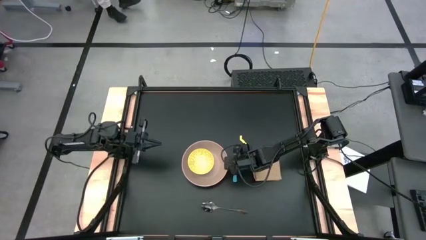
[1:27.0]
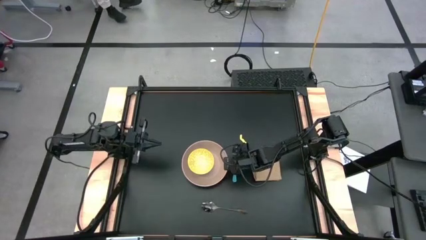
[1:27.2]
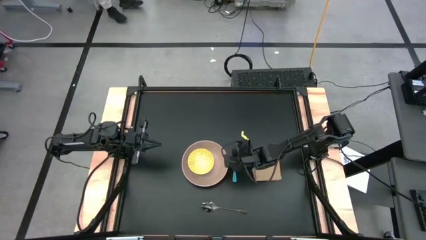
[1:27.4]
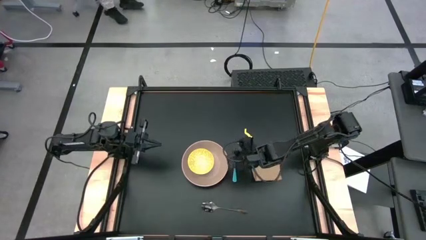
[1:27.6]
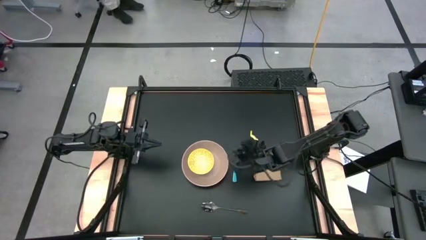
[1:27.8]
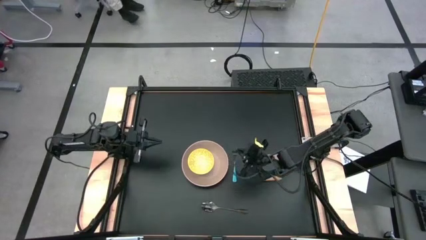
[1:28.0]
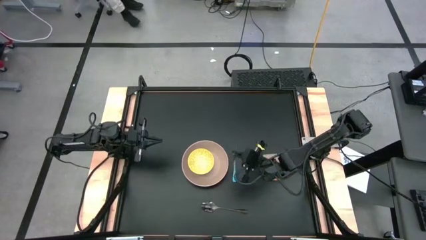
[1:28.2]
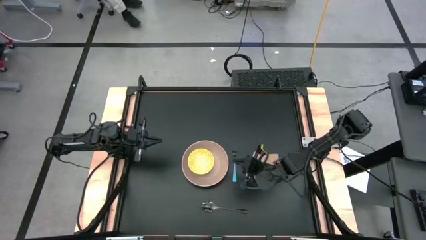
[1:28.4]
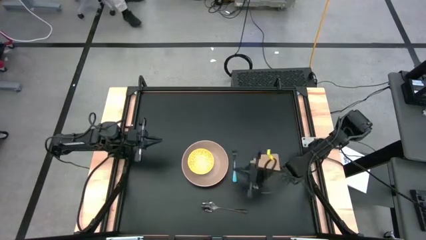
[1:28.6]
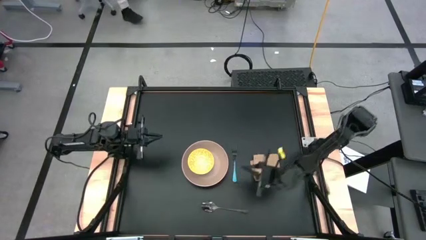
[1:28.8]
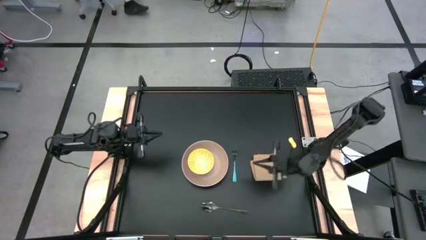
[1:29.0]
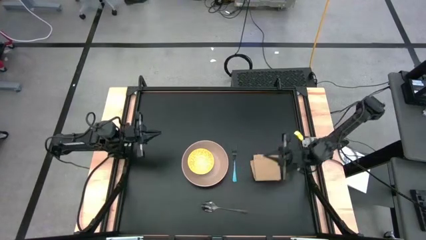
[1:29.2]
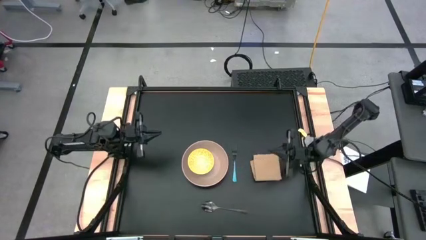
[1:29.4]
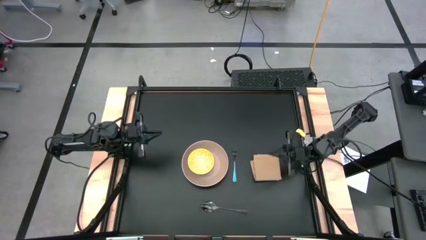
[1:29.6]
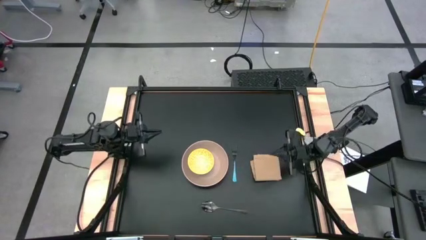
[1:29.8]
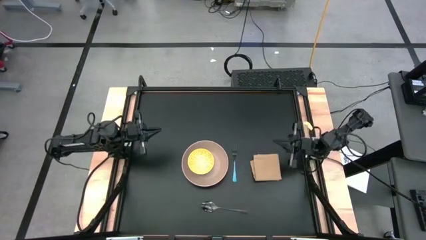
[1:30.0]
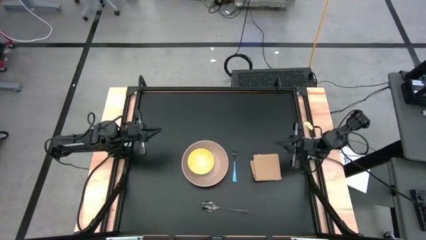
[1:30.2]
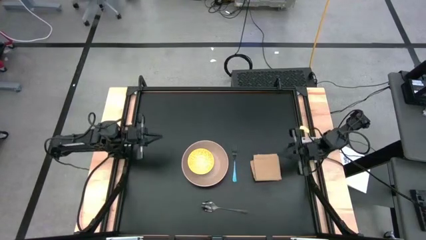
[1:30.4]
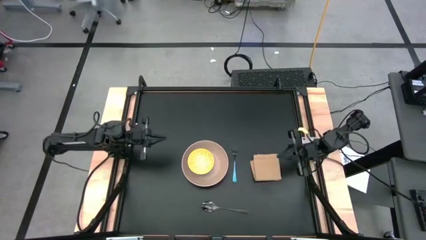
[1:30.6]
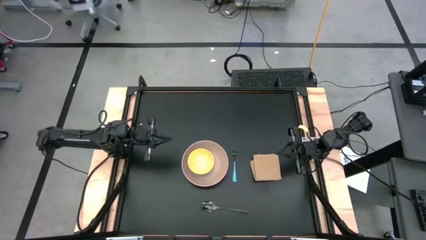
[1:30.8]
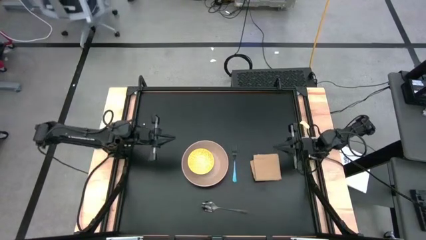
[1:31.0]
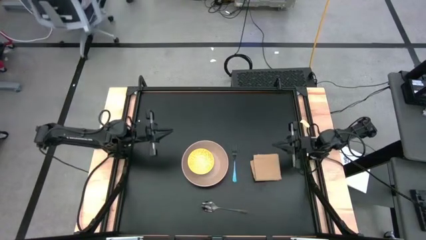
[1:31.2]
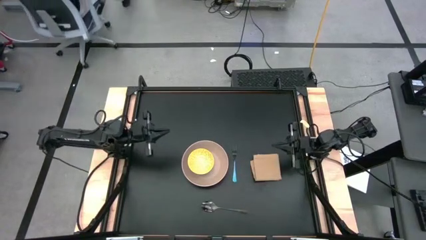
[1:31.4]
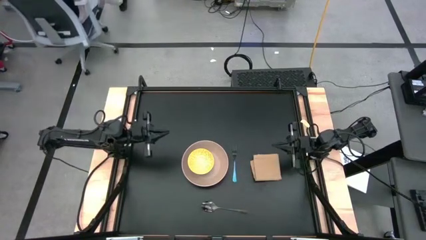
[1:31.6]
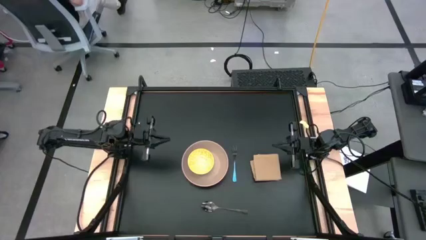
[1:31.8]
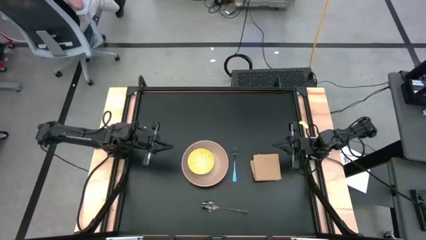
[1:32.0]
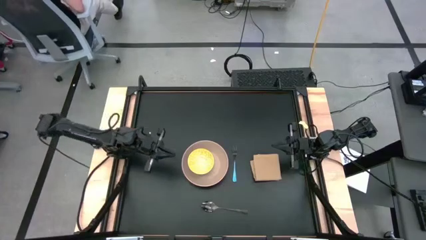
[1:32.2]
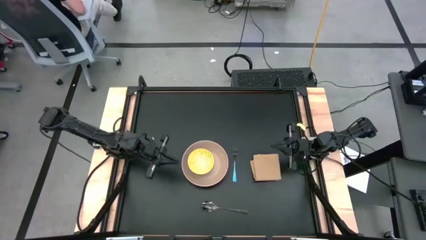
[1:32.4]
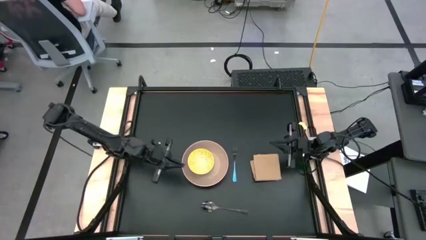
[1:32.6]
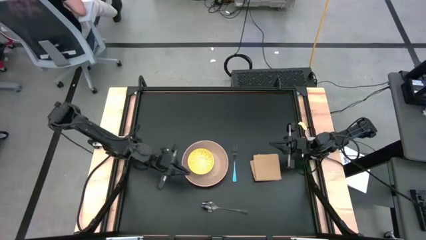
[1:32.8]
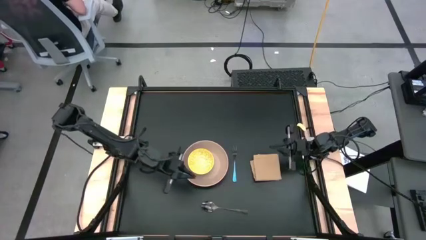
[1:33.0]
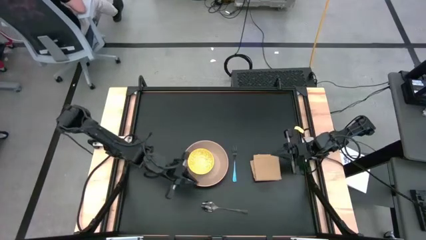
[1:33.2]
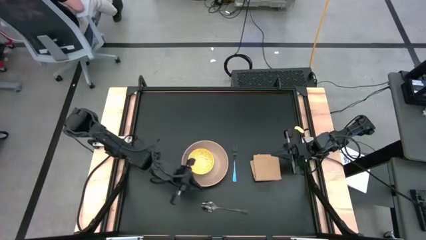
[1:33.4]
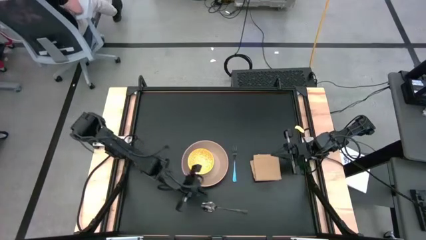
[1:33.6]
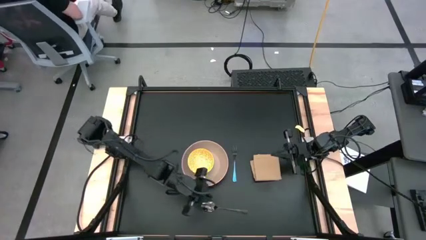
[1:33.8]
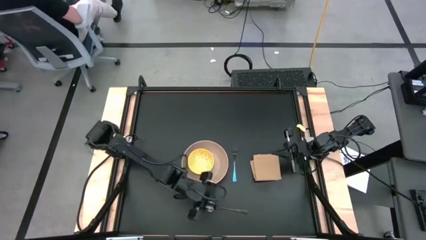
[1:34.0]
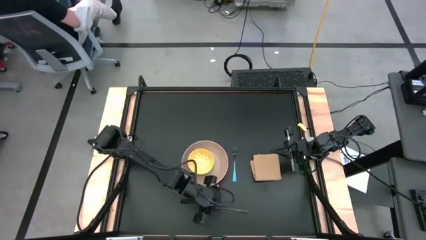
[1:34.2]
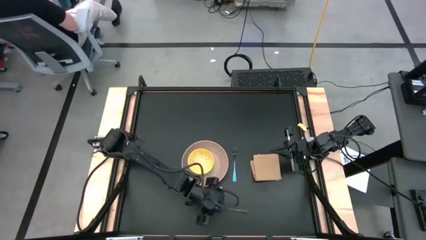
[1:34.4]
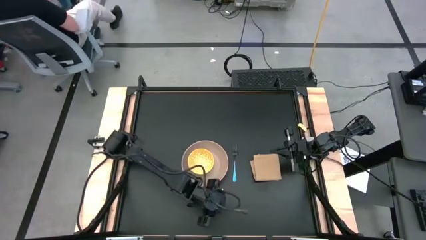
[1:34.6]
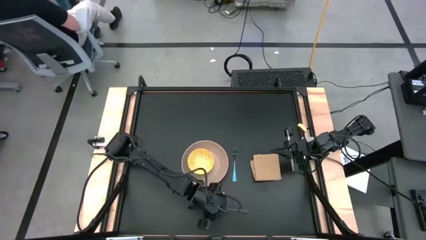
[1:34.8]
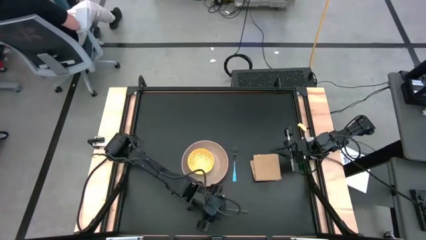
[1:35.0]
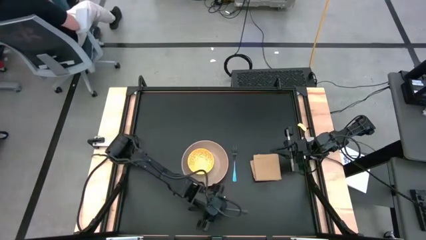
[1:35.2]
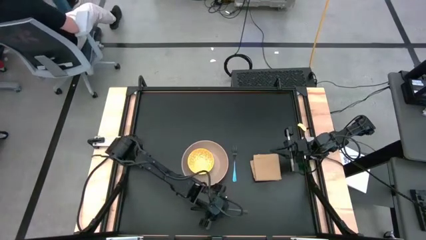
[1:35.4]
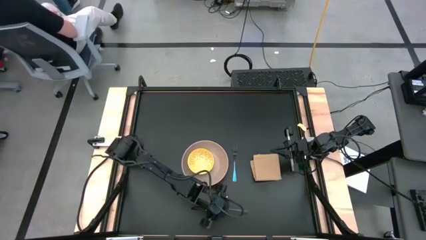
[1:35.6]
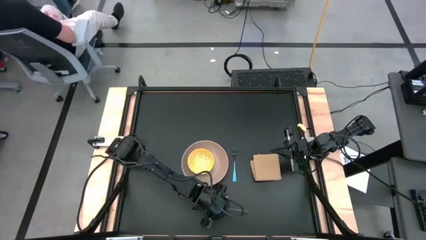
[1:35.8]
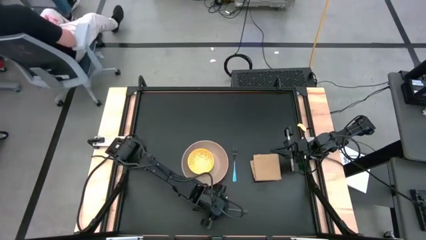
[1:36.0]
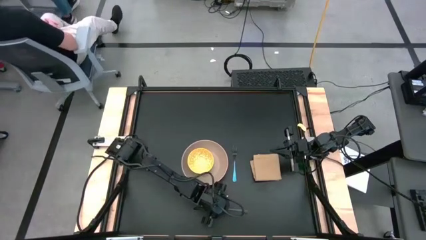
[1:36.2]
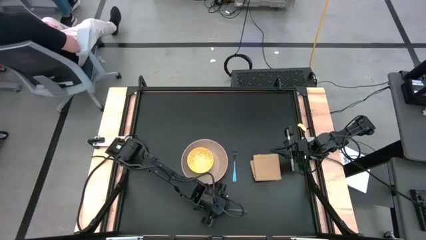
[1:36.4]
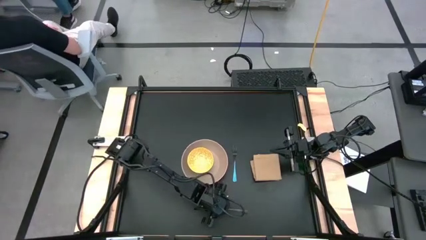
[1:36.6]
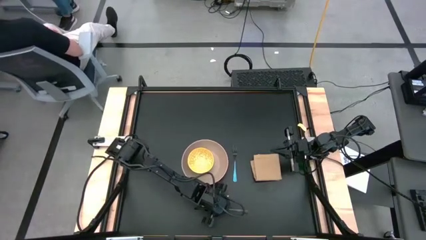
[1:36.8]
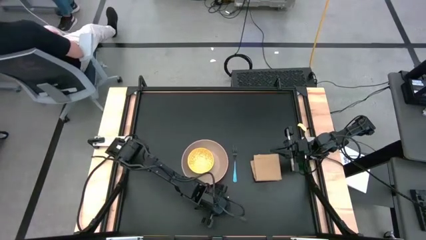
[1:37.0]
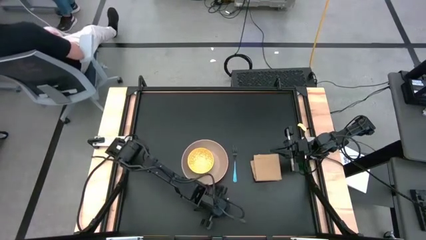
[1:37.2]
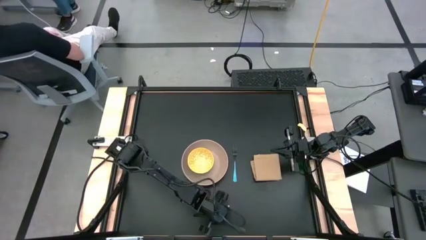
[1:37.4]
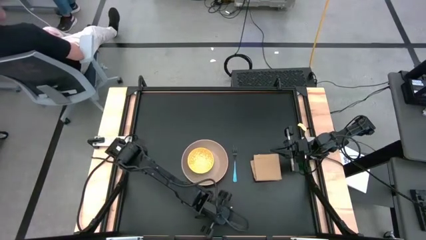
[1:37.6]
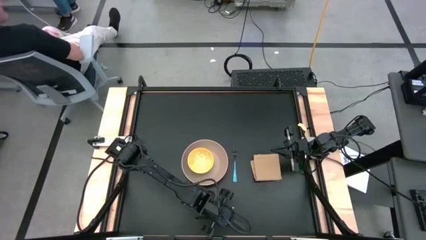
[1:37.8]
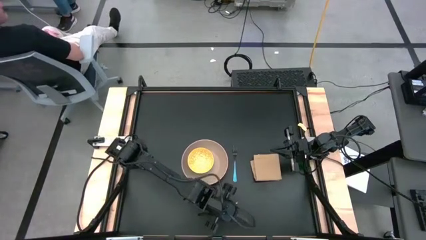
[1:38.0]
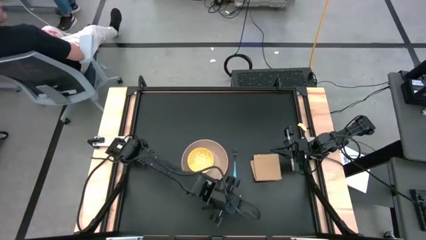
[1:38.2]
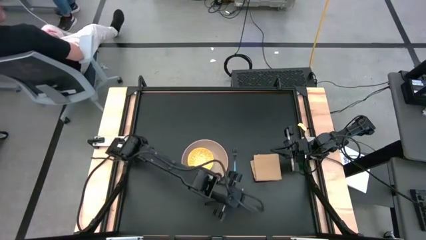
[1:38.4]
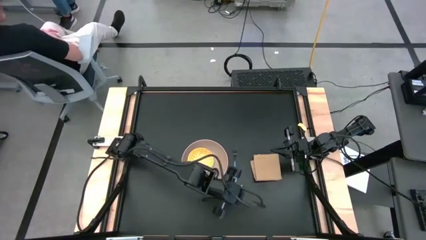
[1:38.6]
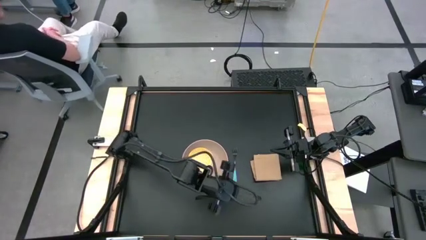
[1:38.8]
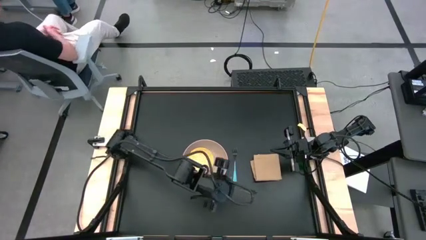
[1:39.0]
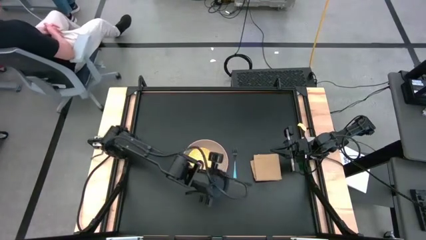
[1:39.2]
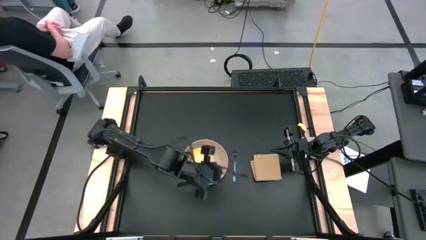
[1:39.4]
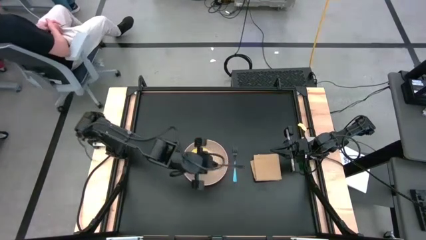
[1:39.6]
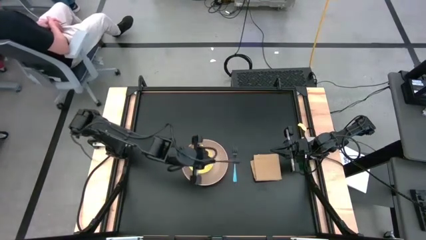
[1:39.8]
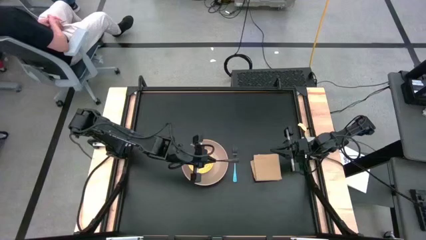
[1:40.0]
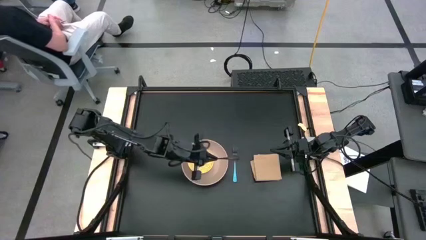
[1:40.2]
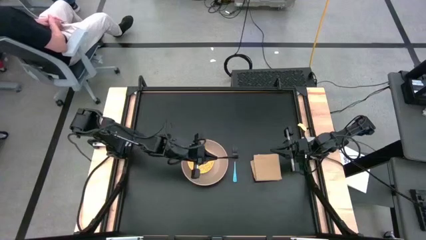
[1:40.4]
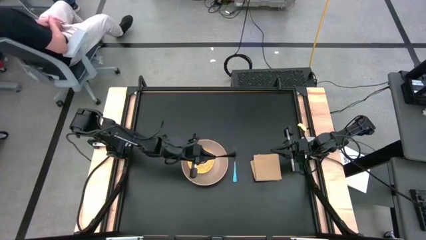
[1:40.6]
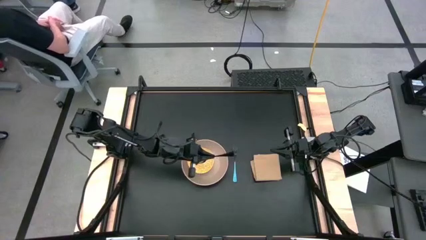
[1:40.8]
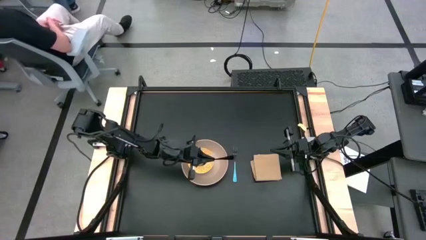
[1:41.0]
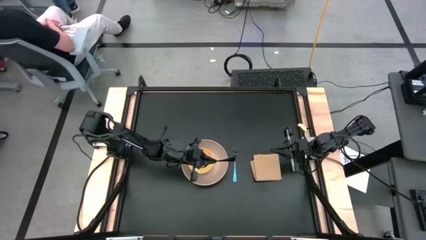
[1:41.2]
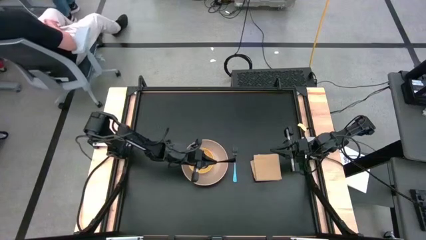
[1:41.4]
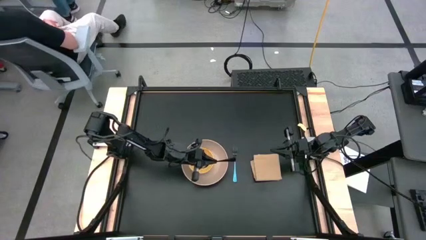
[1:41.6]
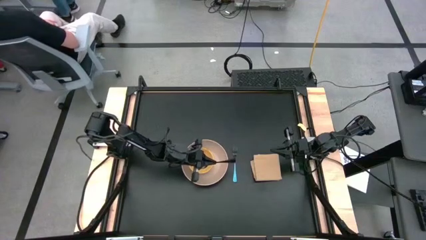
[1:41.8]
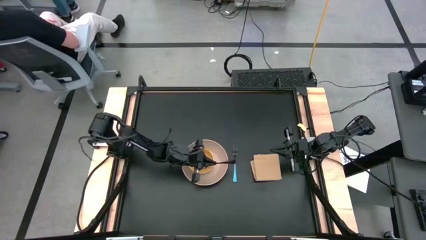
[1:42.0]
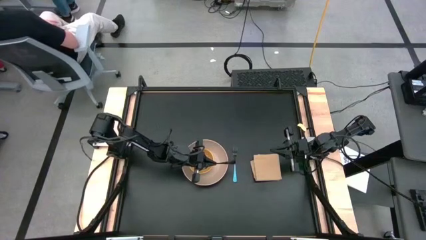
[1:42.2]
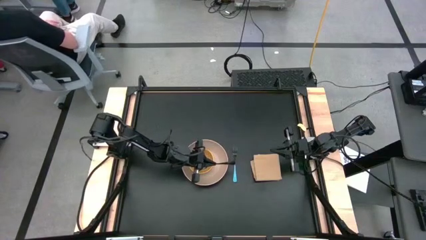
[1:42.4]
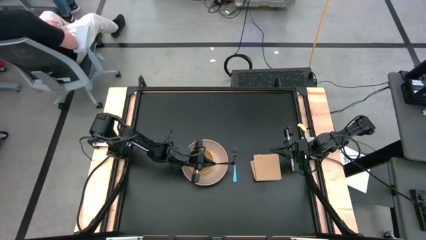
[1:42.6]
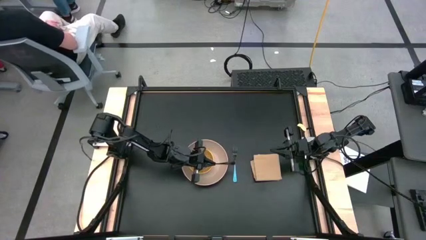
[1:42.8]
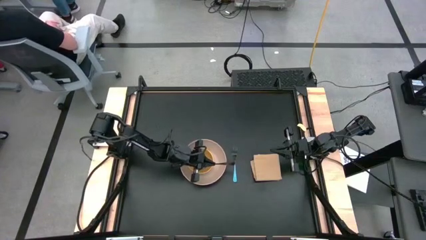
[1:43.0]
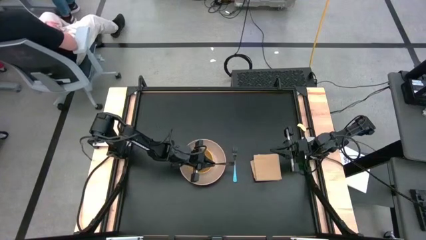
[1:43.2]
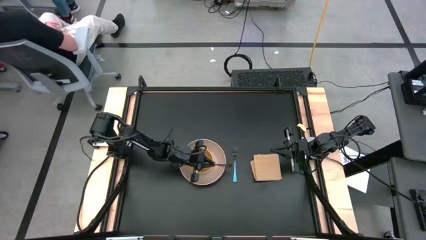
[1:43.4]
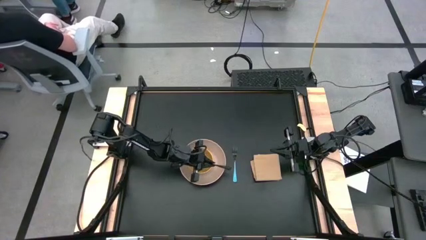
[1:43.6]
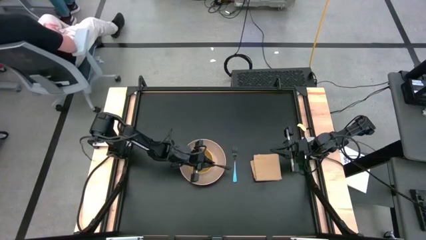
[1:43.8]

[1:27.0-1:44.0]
Task: Set table place
Put the black spoon into the yellow bowl on the brown plate
